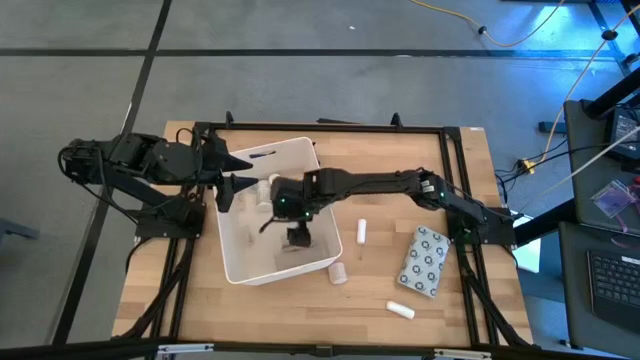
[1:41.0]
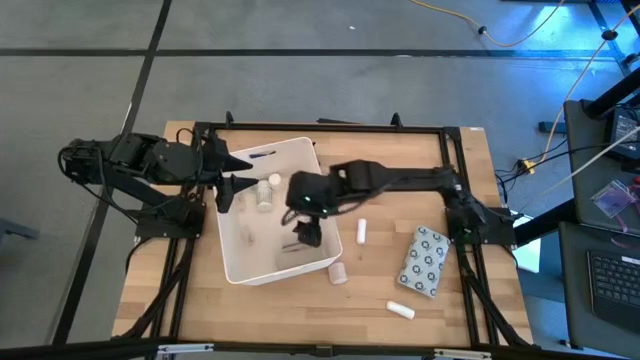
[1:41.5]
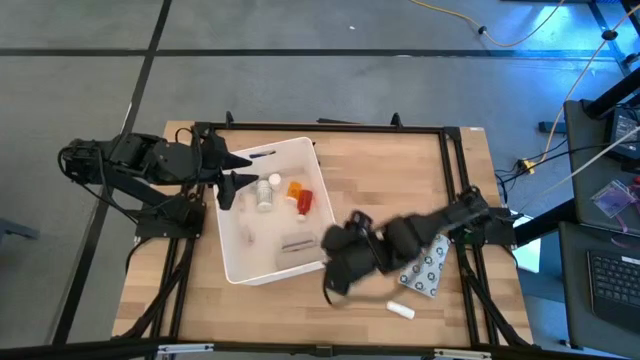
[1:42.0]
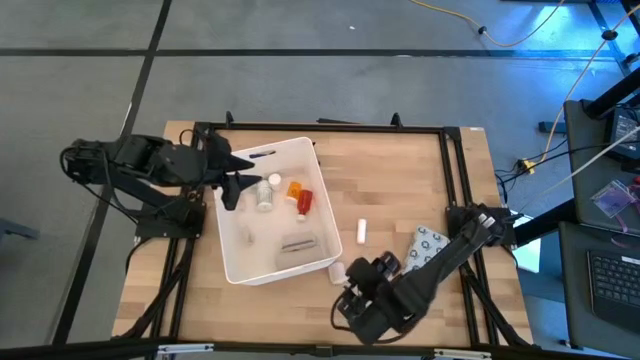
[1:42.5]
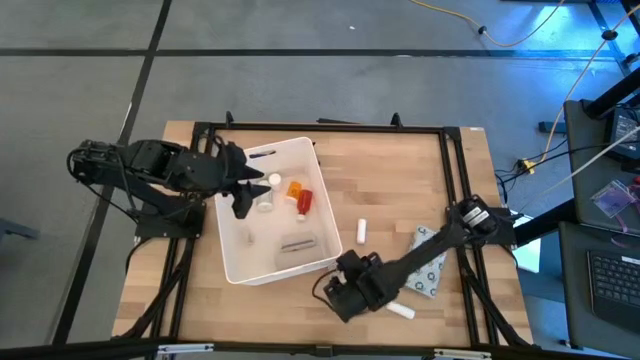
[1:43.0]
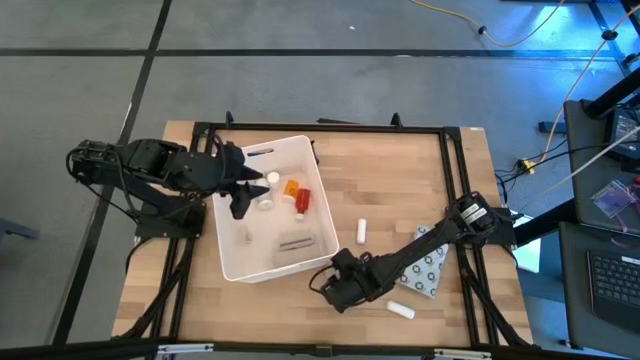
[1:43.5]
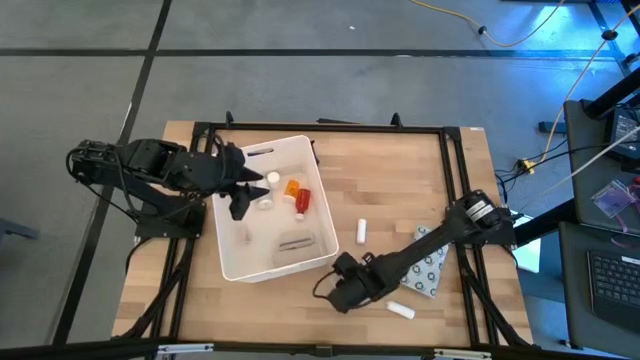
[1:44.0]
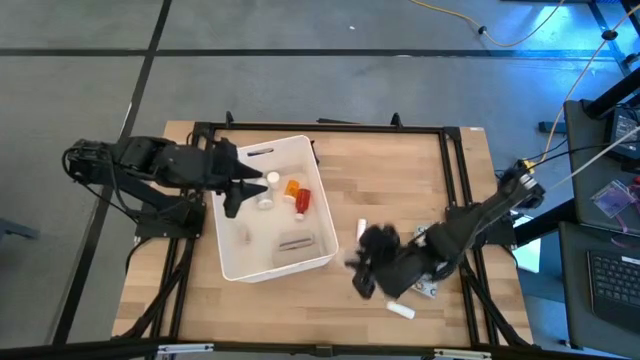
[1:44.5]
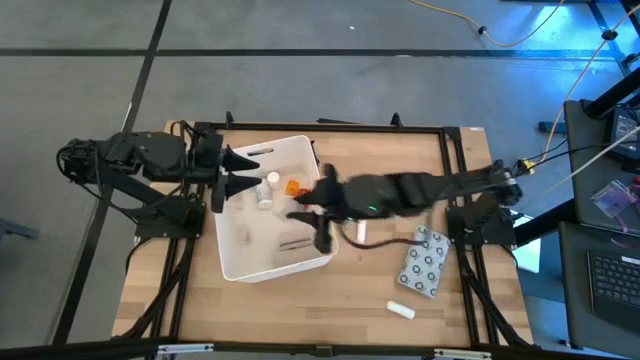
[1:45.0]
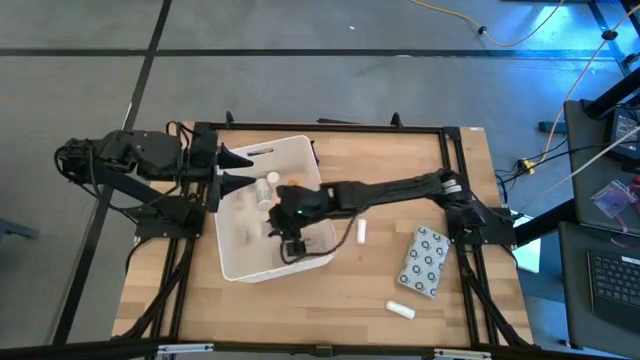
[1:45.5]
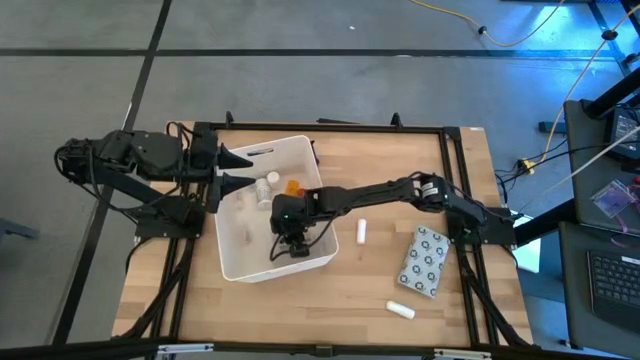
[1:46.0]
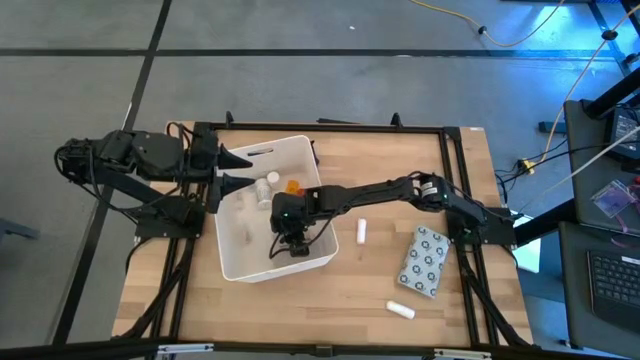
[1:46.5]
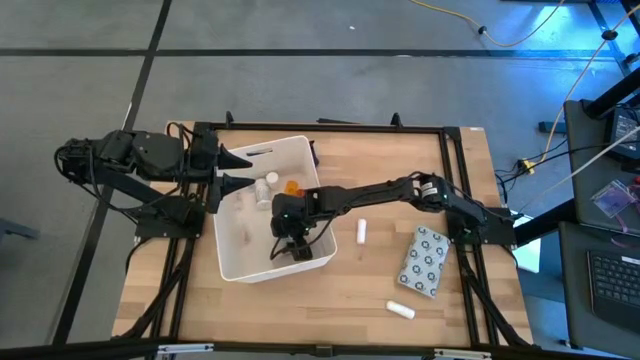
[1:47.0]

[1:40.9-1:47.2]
Task: Pick & place medical supplies in basket/bin
Put the light brown bandage into the white bin

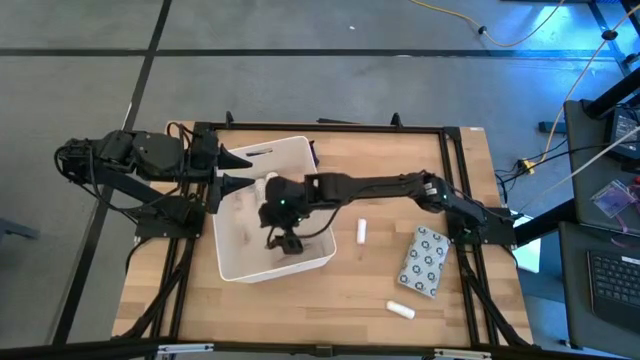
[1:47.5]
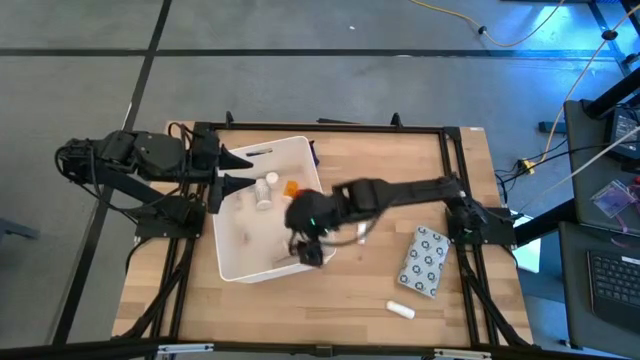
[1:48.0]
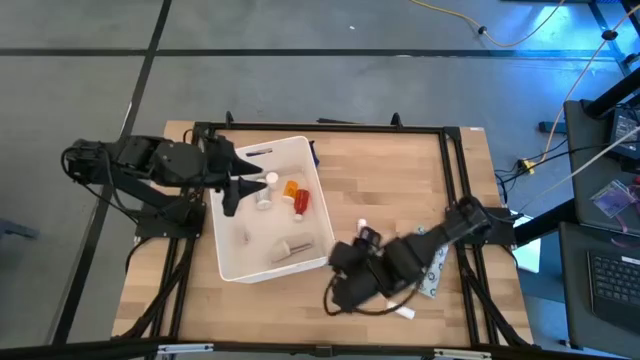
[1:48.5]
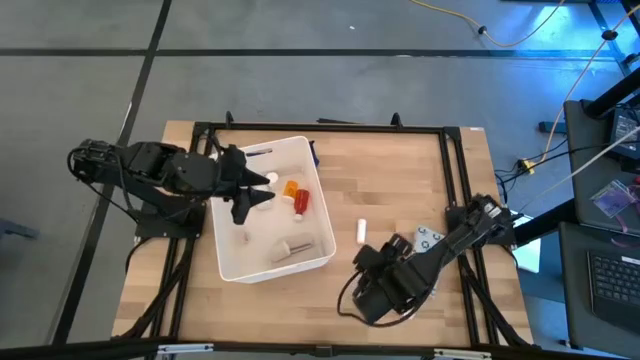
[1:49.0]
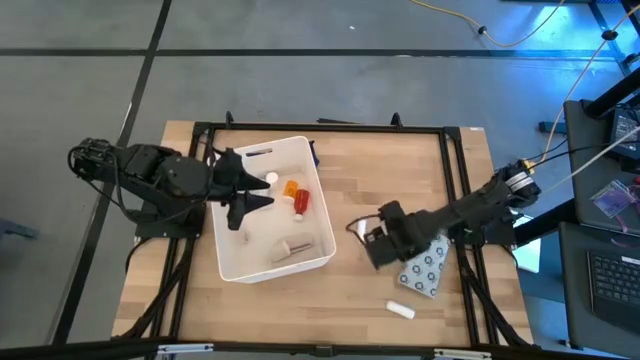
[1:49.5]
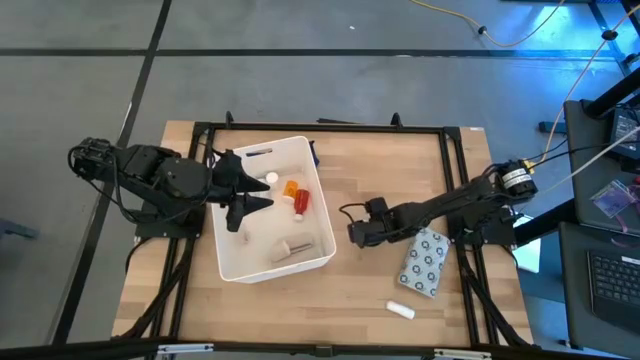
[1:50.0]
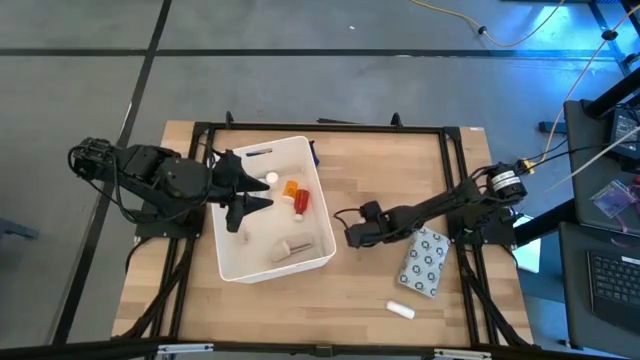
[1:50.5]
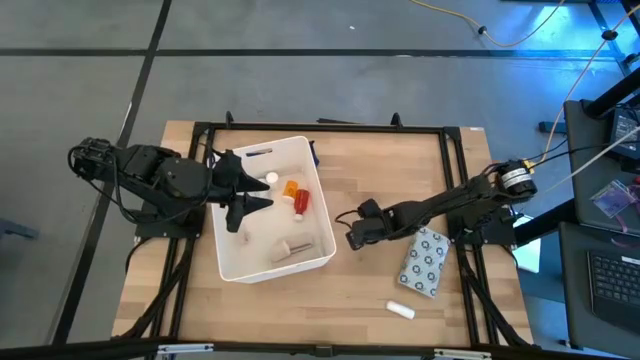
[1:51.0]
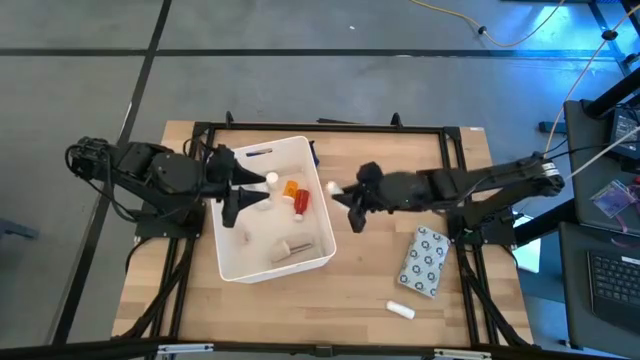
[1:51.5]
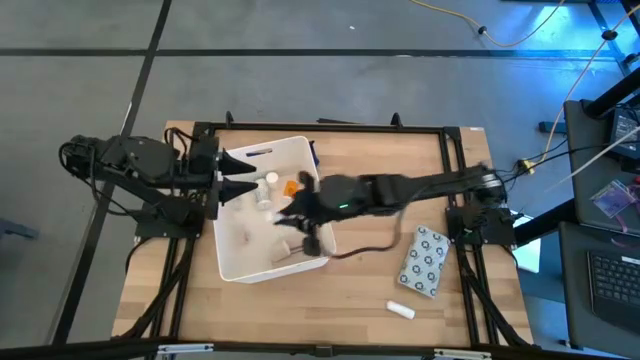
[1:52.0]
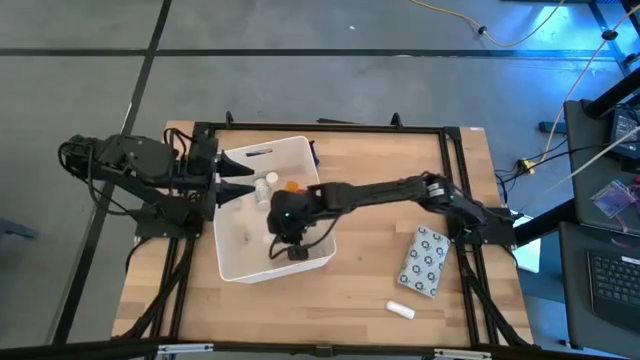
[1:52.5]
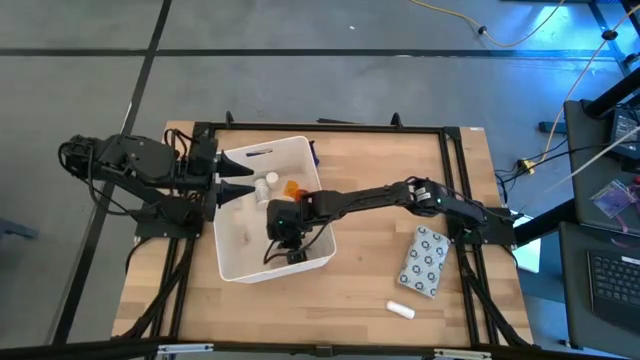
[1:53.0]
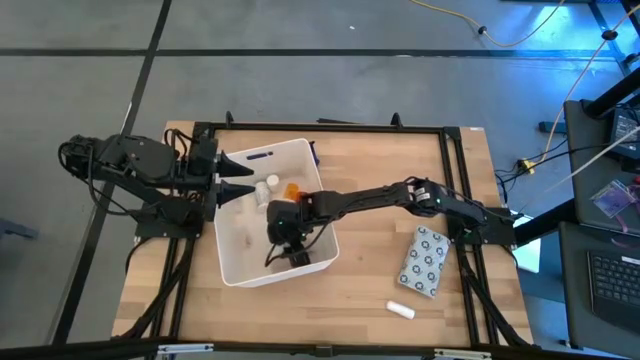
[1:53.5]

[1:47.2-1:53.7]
Put the top white rolled gauze into the white bin

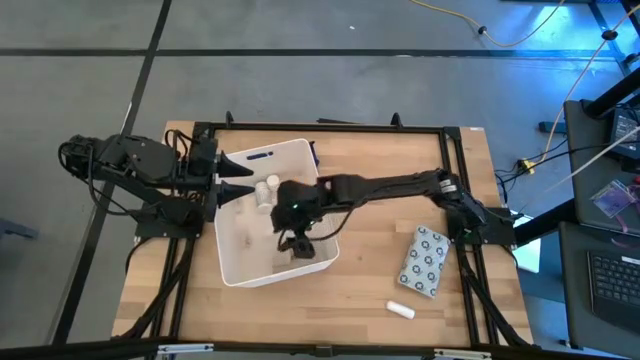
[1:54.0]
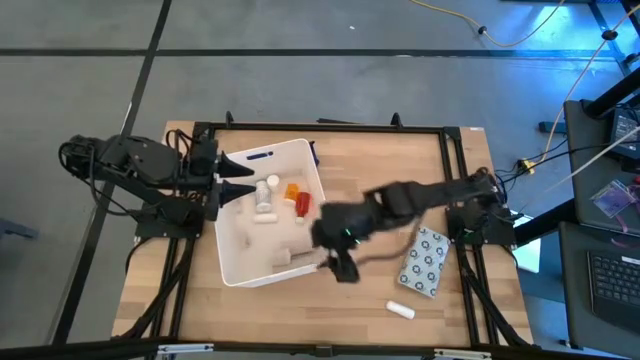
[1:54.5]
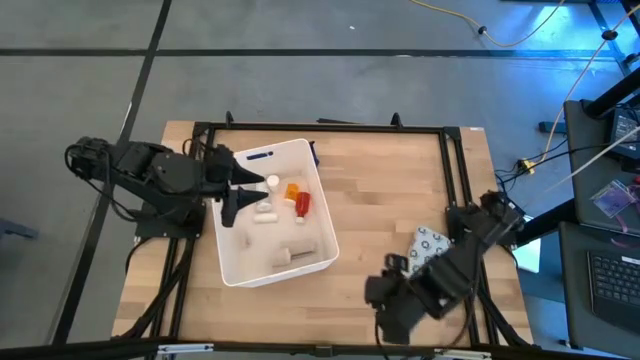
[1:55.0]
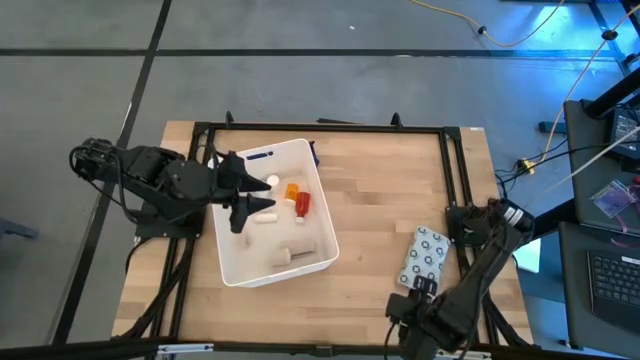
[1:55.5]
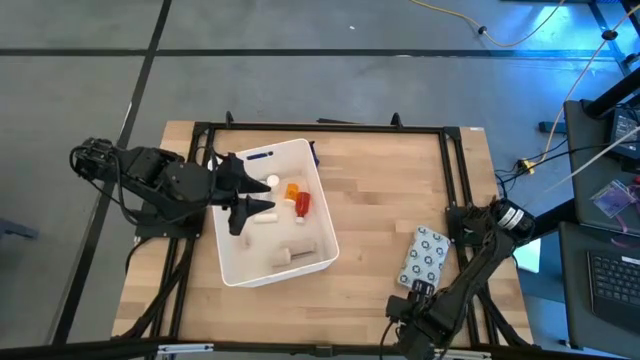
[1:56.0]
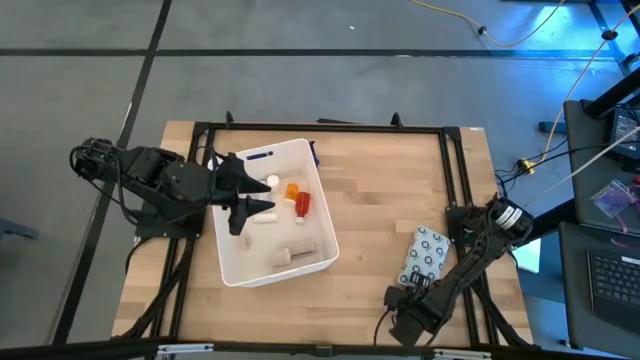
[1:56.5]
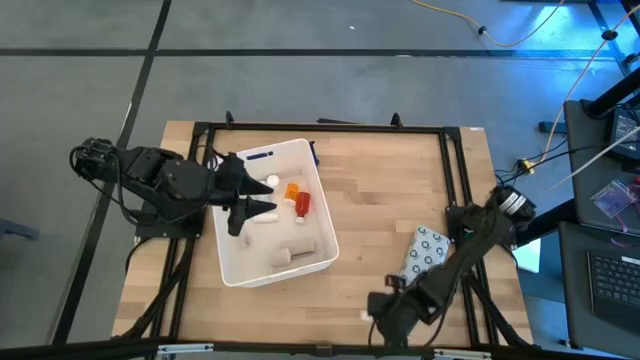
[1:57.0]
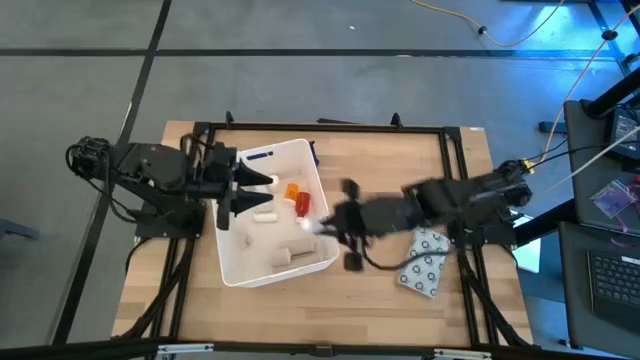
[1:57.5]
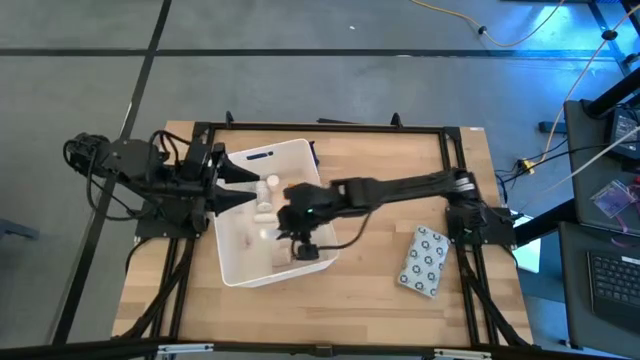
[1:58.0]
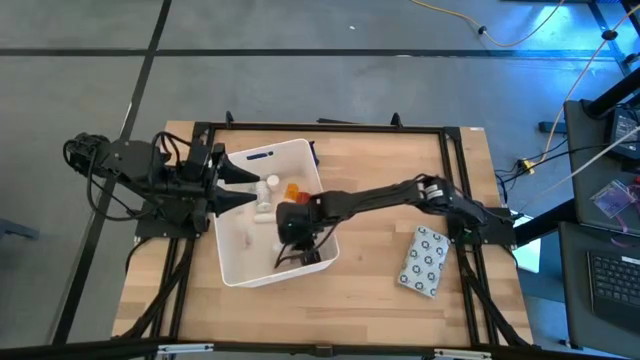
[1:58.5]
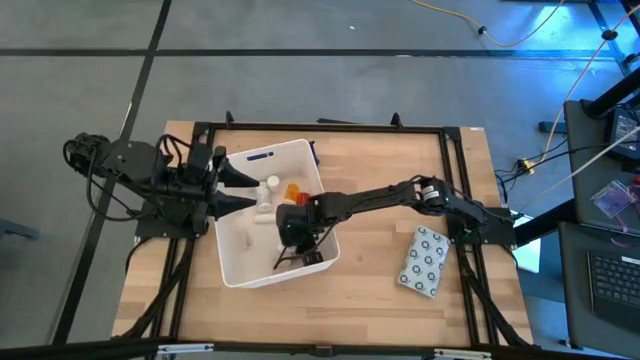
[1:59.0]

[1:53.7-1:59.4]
Put the white rolled gauze into the white bin

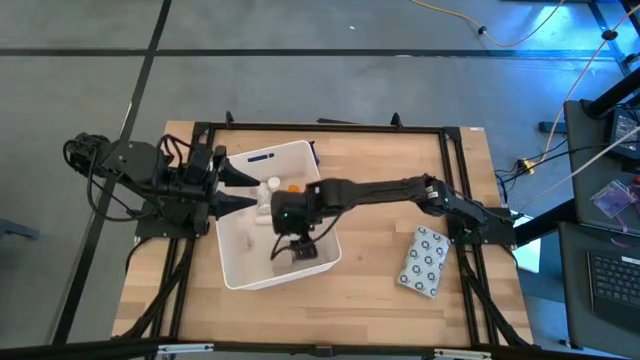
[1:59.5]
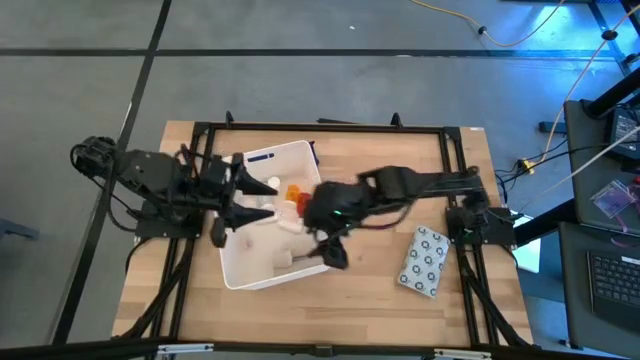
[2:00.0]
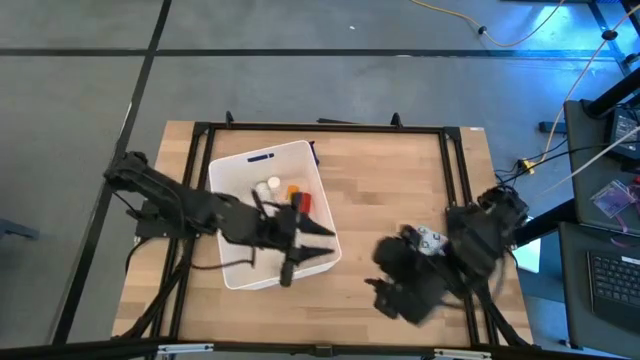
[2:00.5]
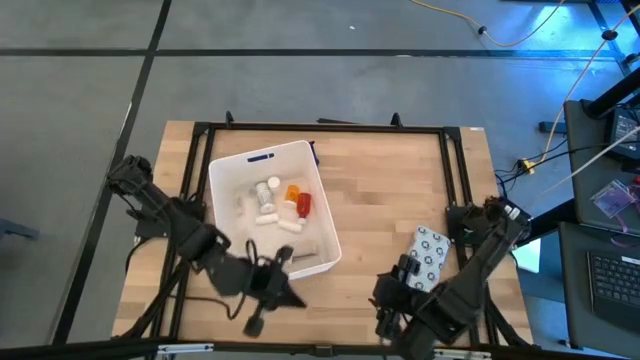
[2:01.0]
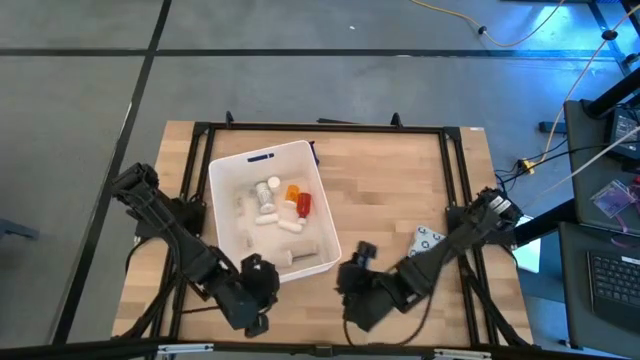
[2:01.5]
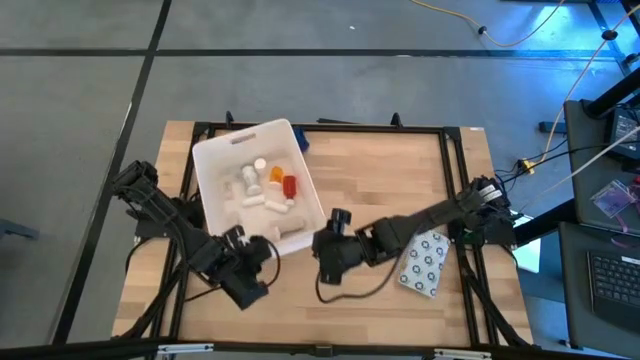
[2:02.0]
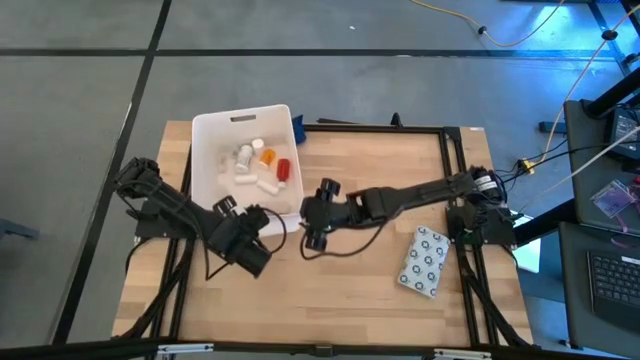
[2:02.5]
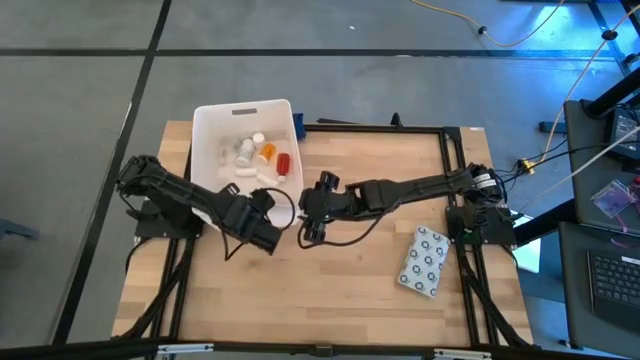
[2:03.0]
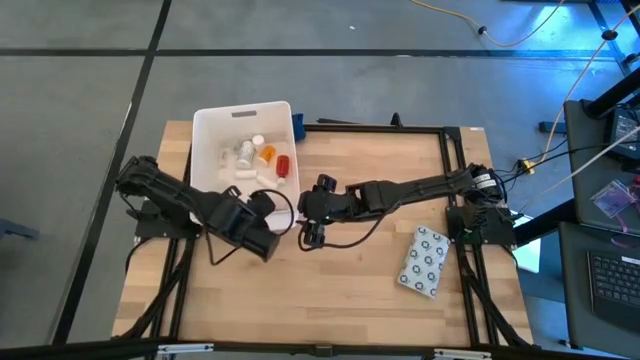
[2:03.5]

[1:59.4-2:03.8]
Adjust the white bin
